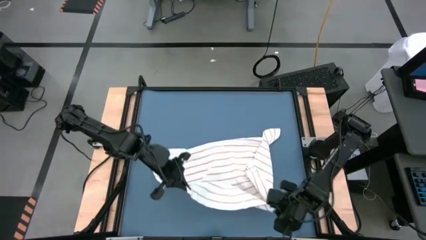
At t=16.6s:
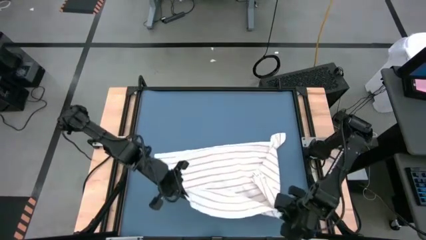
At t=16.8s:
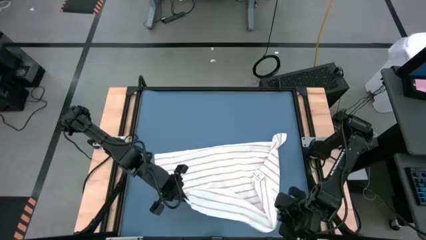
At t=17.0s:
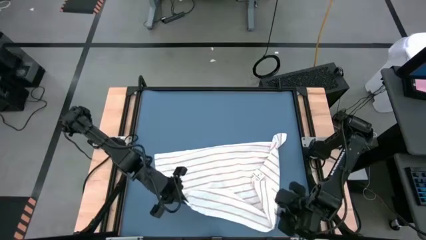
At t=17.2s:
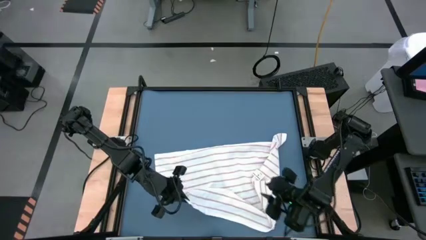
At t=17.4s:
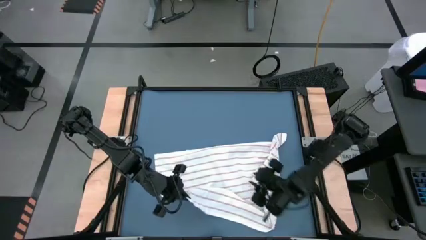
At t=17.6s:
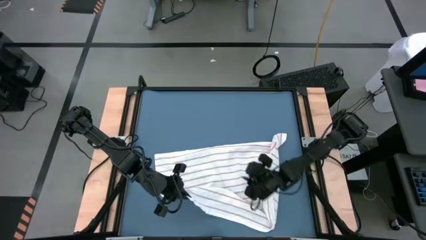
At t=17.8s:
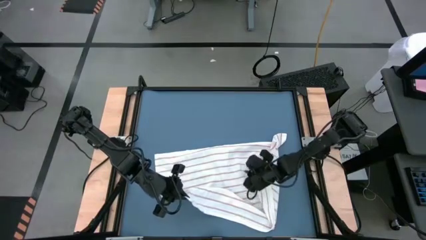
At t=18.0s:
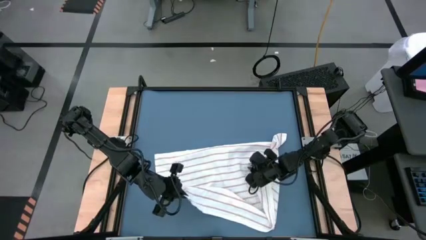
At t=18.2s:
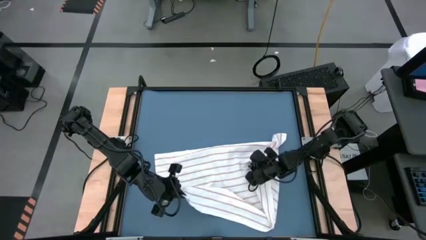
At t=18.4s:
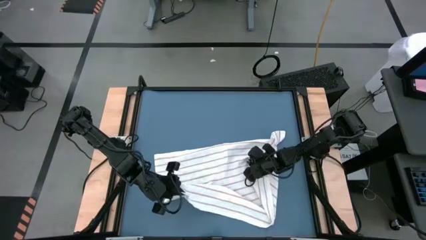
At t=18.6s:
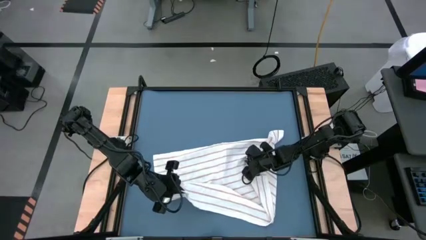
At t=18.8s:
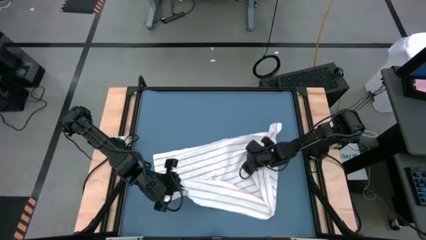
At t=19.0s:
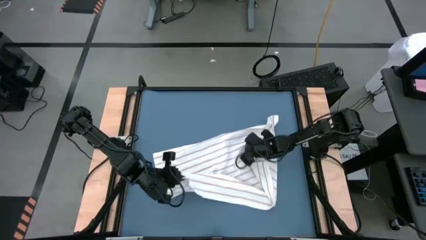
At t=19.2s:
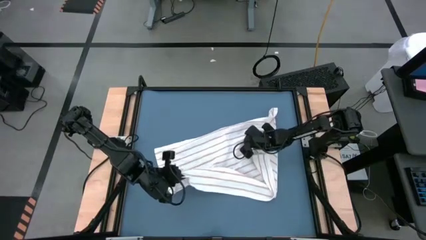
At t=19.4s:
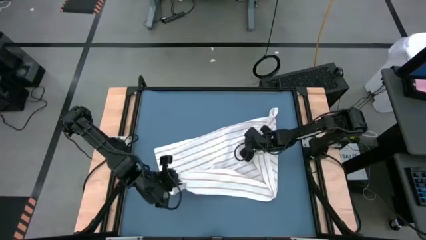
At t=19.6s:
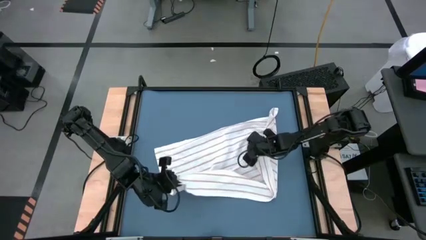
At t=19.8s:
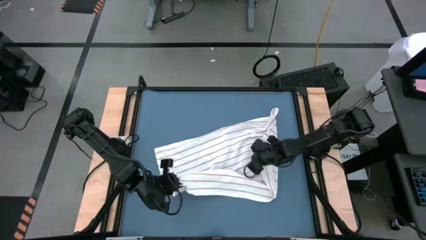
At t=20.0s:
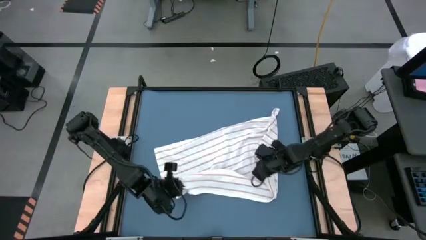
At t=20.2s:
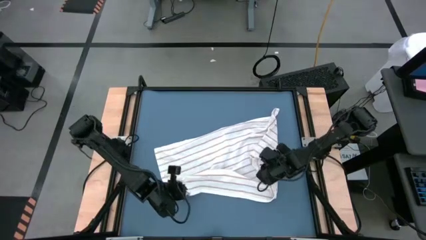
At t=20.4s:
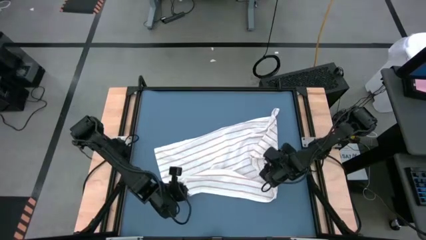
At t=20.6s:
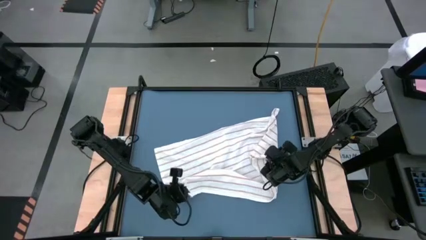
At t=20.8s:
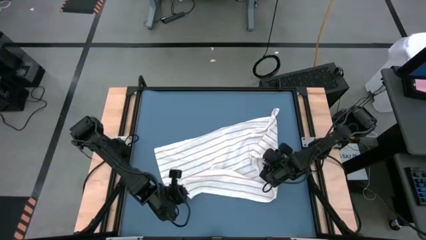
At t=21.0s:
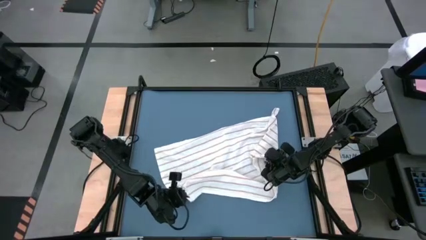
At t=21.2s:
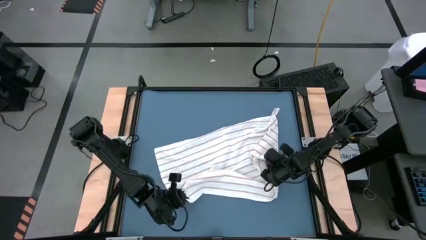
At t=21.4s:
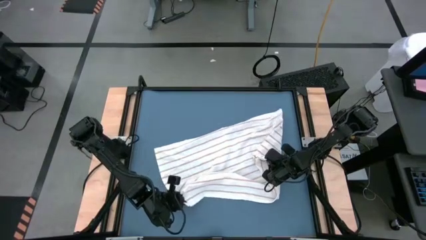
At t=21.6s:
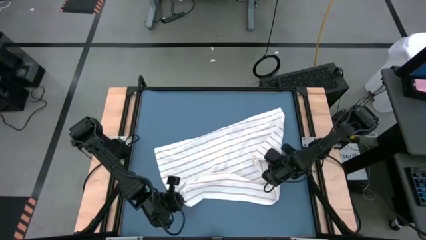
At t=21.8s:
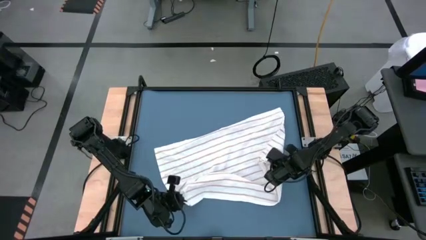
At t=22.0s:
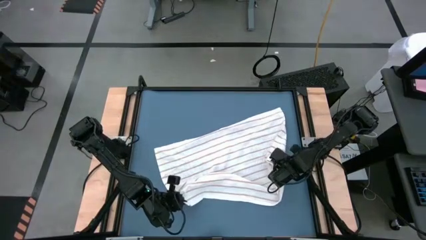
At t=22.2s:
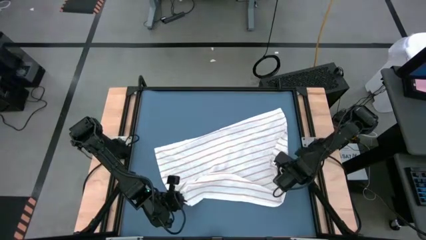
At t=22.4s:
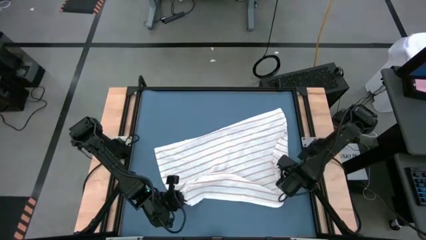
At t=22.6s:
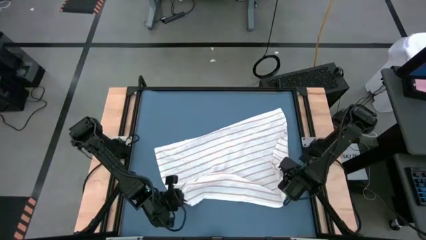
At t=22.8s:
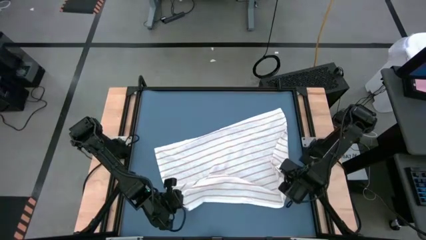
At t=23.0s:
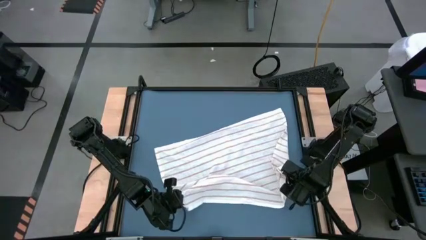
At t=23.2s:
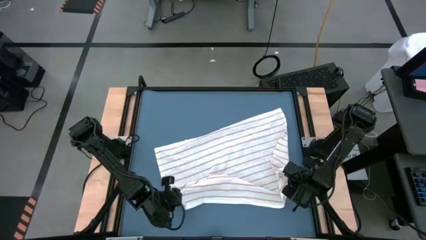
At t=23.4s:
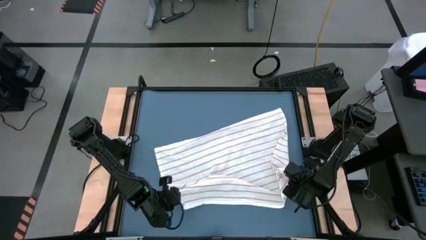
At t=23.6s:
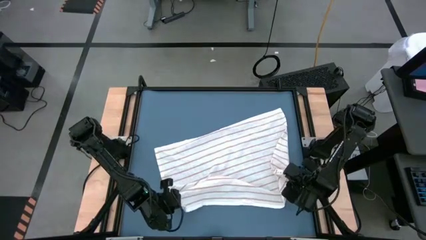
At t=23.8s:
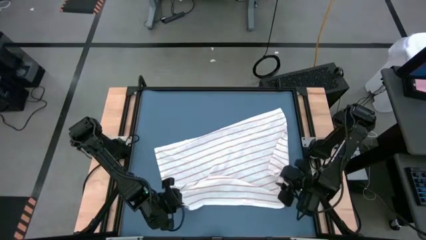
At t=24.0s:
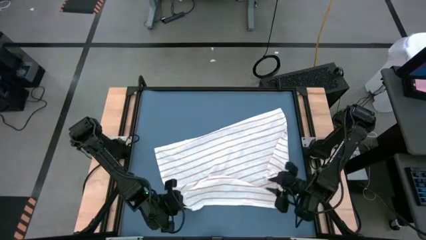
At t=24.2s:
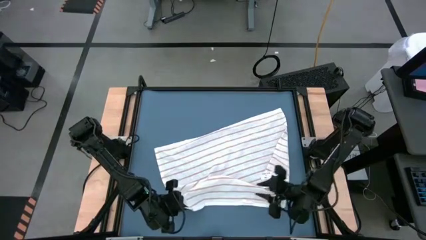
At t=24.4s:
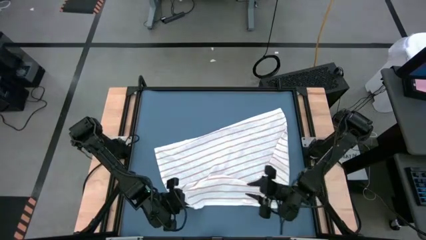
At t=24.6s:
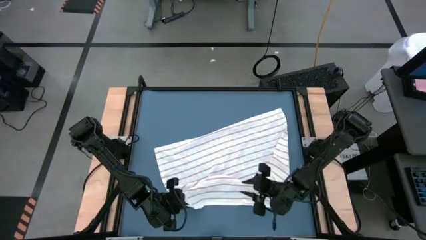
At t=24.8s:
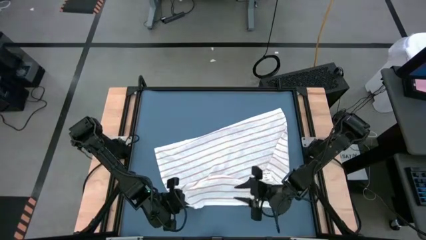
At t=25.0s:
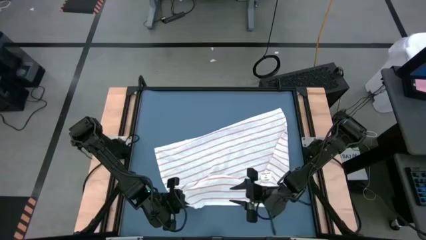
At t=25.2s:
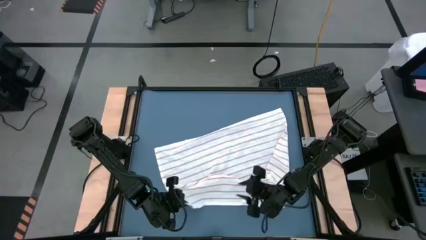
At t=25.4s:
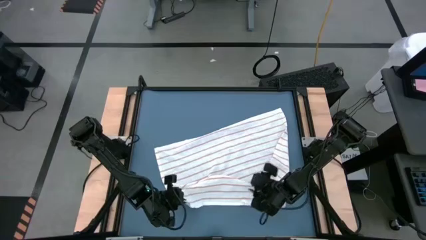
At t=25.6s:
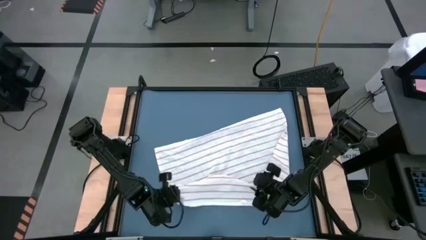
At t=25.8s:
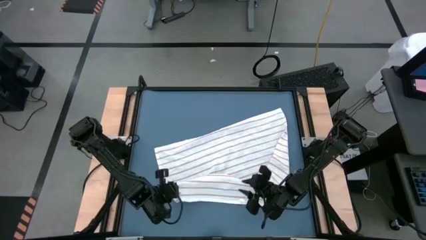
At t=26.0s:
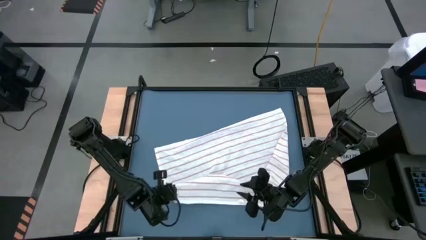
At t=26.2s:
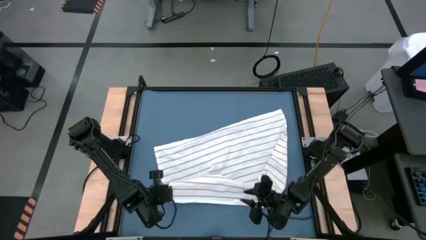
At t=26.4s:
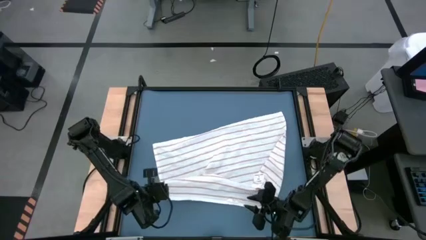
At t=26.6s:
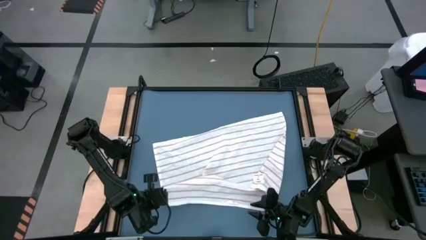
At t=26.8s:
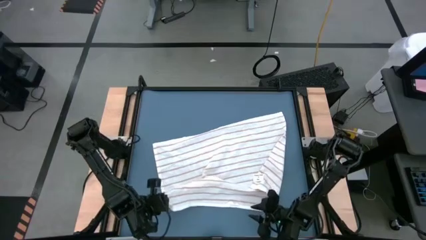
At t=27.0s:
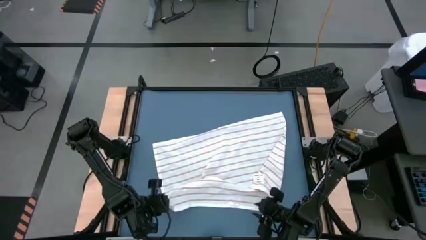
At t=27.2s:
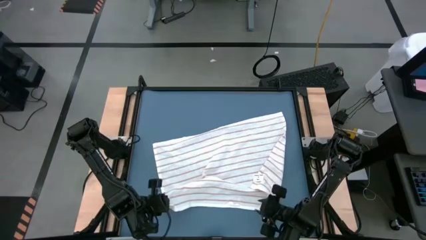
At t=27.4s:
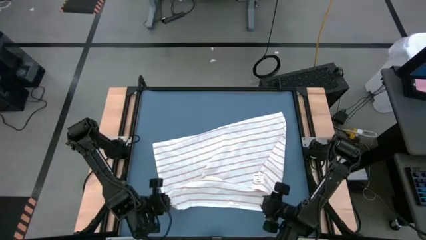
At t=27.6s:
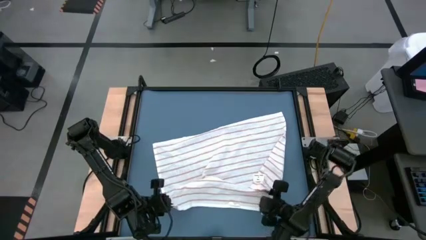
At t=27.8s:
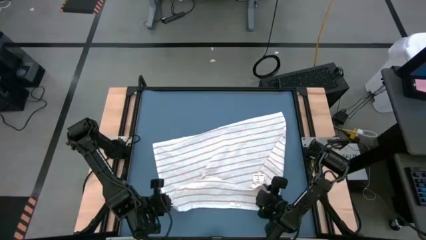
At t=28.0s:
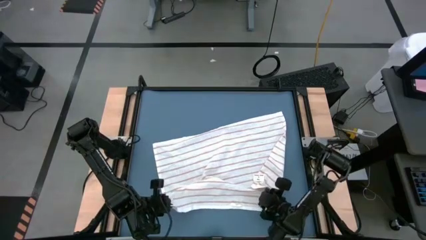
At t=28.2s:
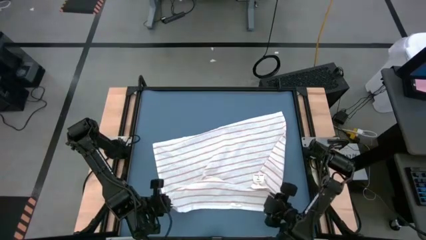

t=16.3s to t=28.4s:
Task: Roll towel
Fold the white towel

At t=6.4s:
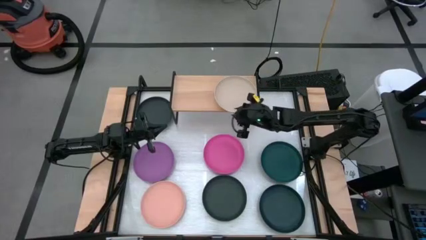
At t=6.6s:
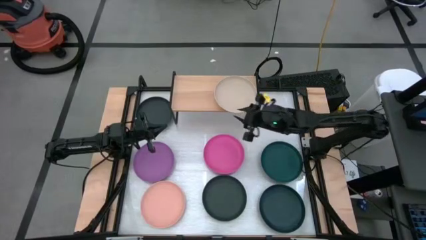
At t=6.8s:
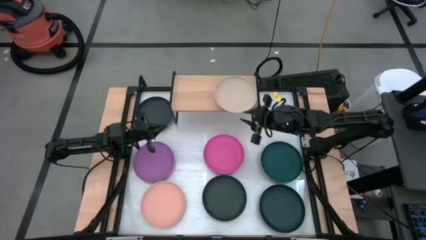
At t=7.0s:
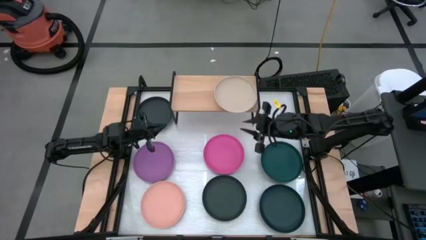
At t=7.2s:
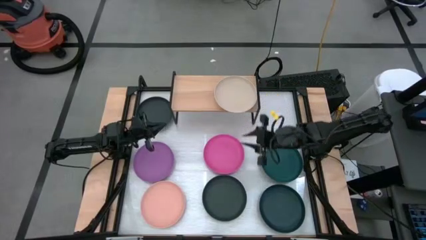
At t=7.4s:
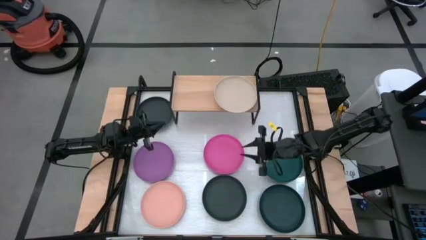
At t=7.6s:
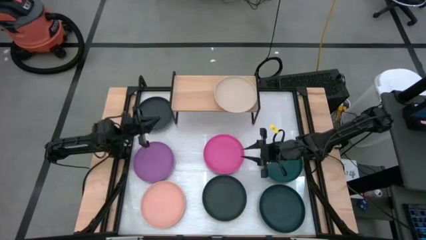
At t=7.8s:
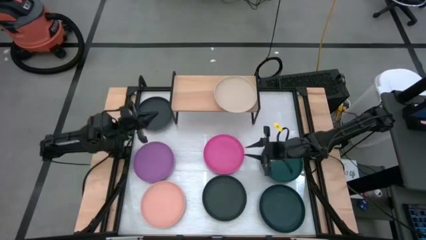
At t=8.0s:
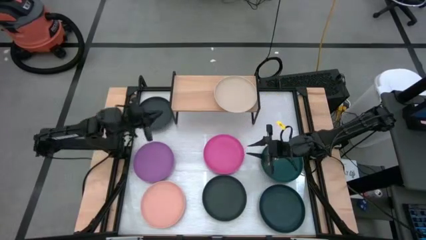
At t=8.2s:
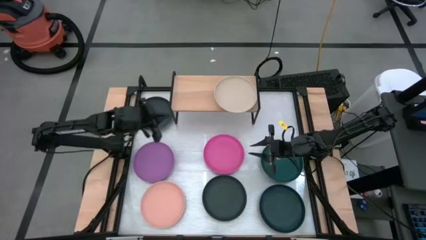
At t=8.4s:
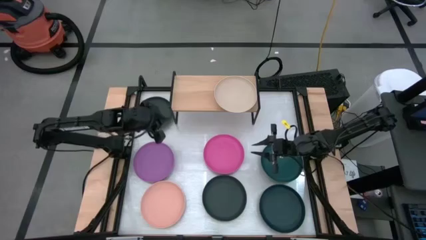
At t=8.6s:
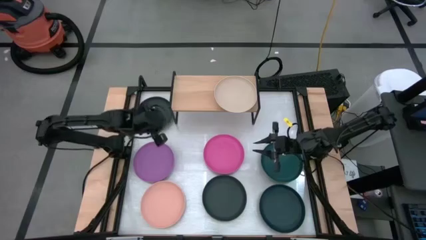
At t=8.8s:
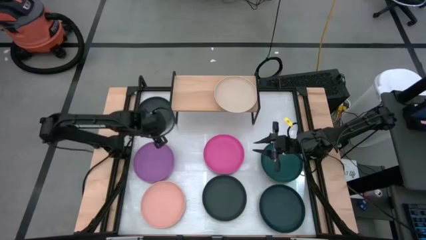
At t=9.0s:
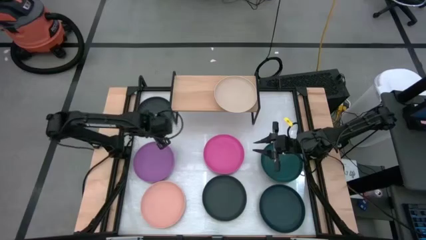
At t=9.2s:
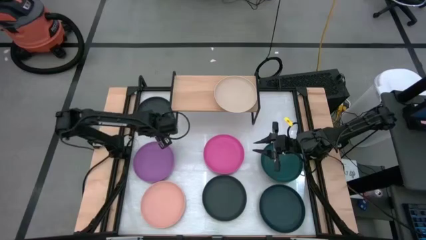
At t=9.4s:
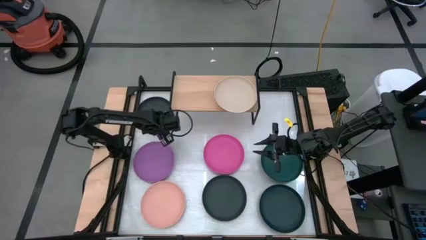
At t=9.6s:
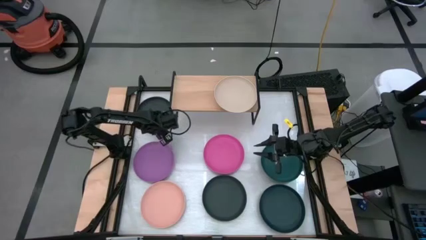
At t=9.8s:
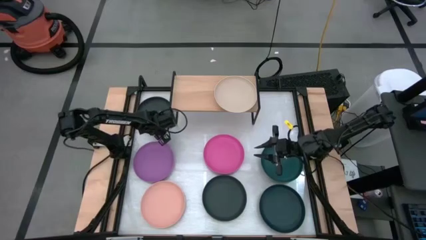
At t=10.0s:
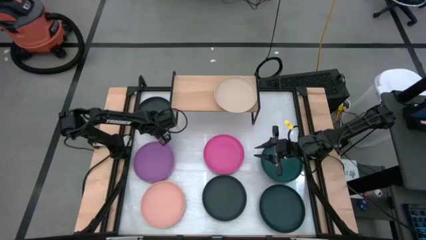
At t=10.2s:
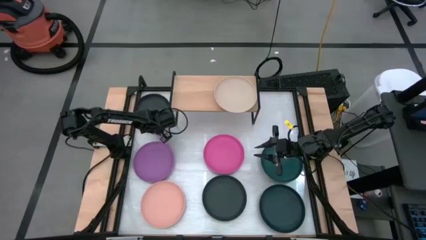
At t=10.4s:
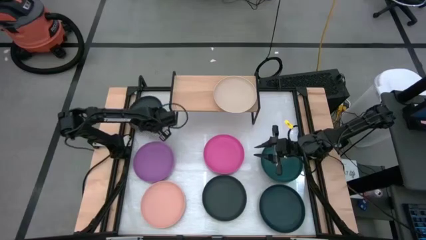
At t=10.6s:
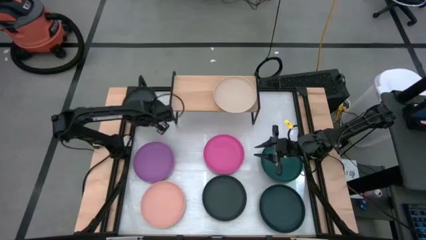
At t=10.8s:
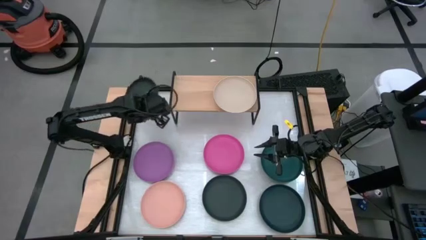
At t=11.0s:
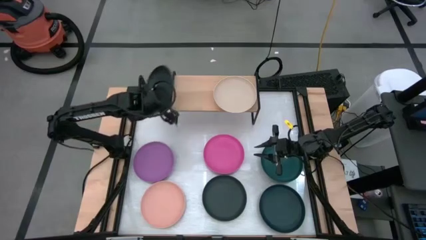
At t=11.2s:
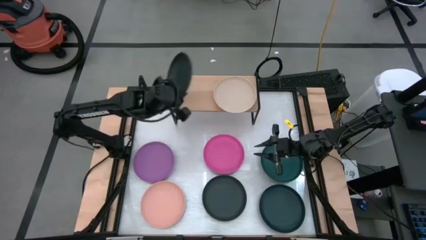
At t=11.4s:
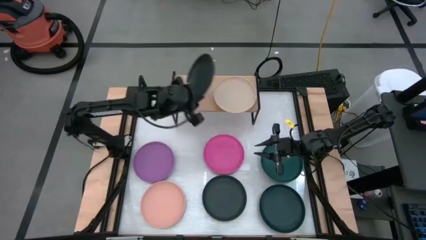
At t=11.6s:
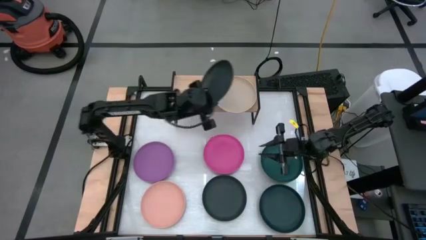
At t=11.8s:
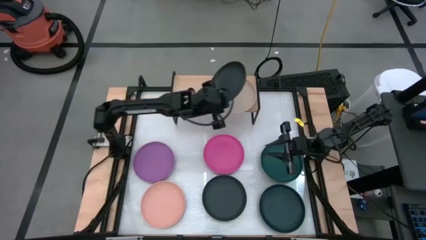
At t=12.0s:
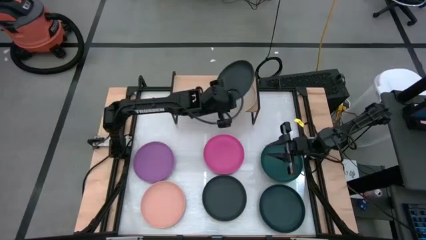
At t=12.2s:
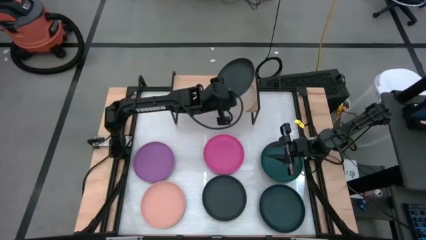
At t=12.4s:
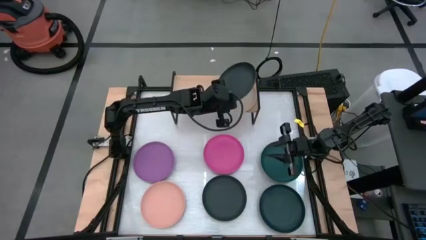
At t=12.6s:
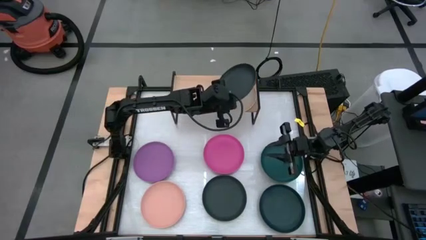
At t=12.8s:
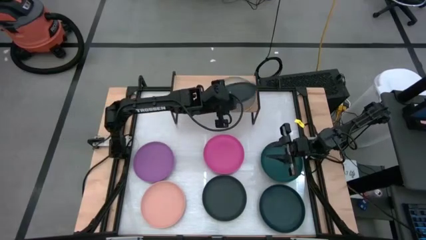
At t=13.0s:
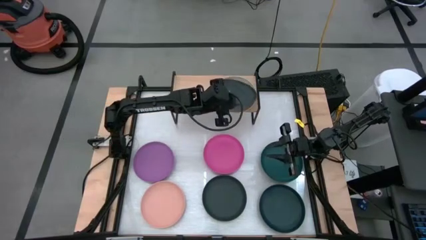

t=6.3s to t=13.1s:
Task: Place and stack plates onto a shelf
Stack the top black plate on top of the light brown plate on the shelf
